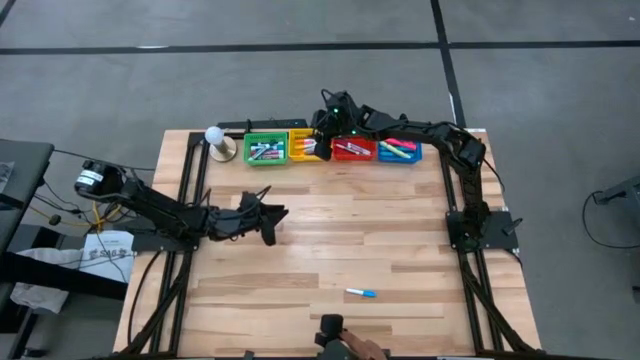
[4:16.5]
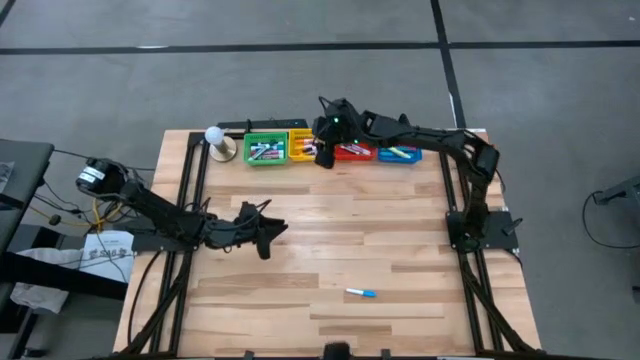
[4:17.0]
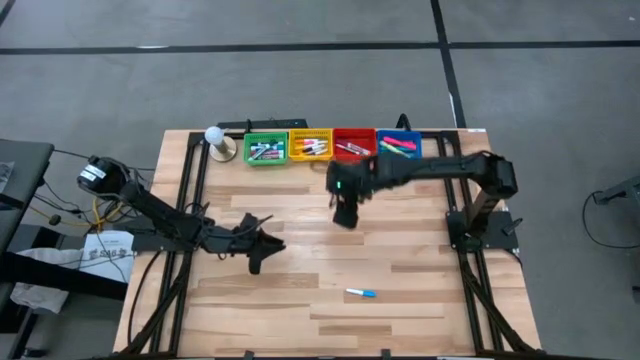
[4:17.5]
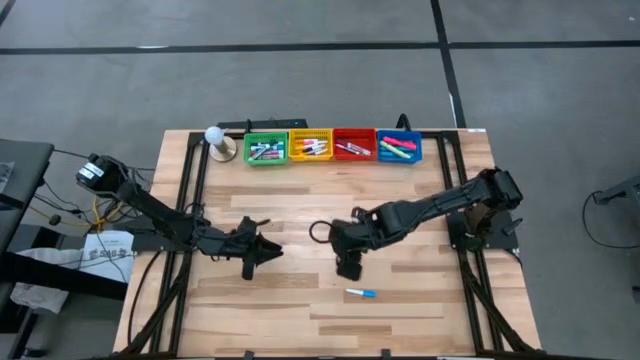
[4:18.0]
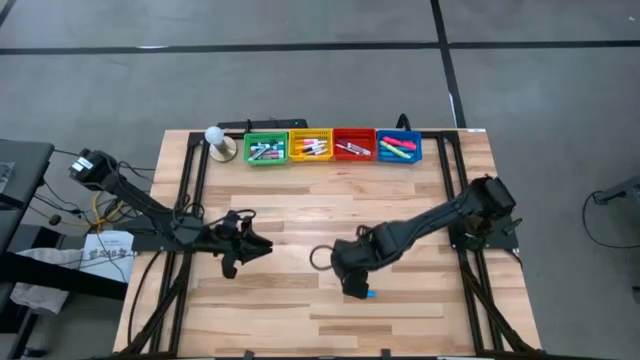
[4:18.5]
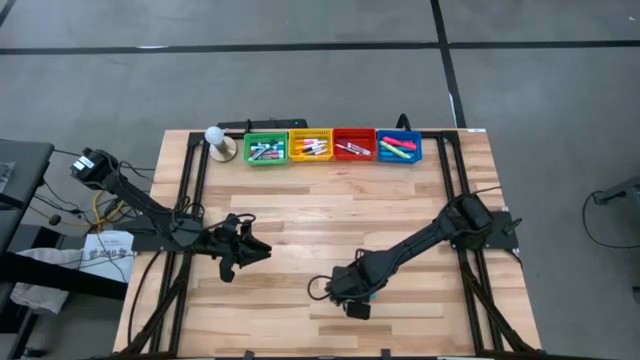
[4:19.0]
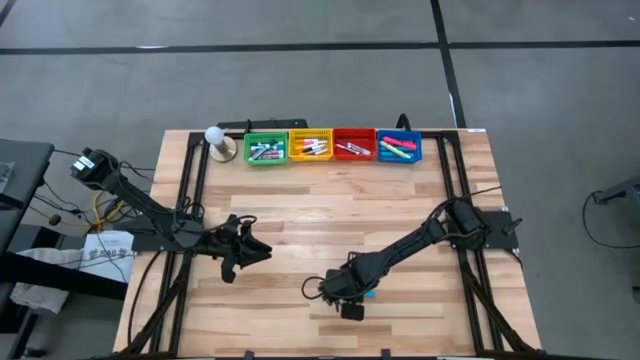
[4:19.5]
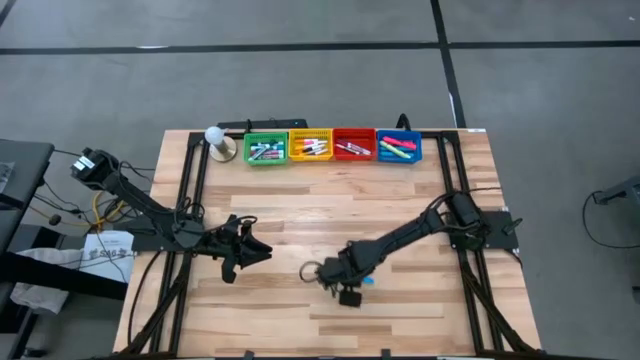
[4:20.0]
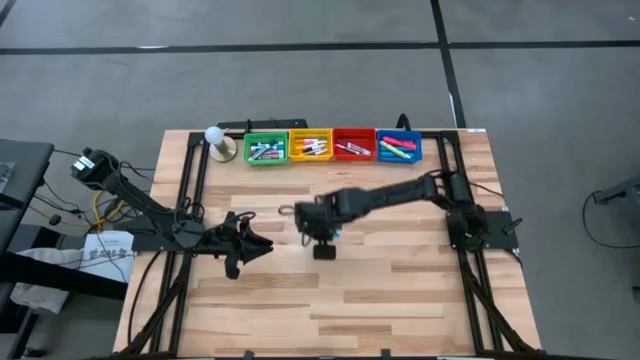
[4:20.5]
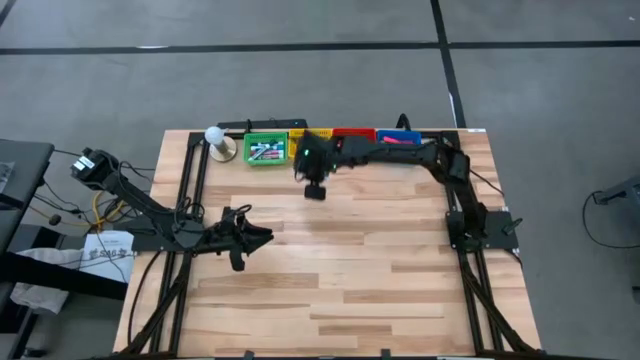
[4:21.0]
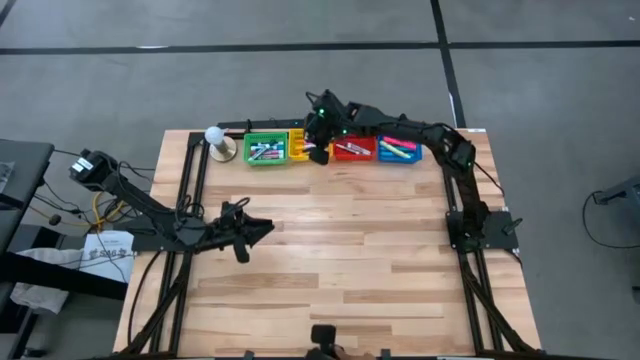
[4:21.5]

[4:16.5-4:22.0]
Task: Pick & Place Markers
Put the light blue highlighter pen into the yellow basket

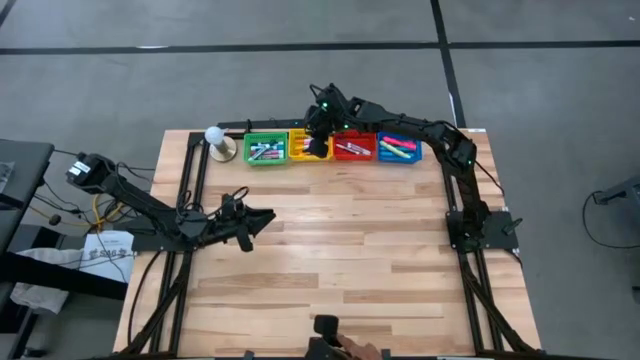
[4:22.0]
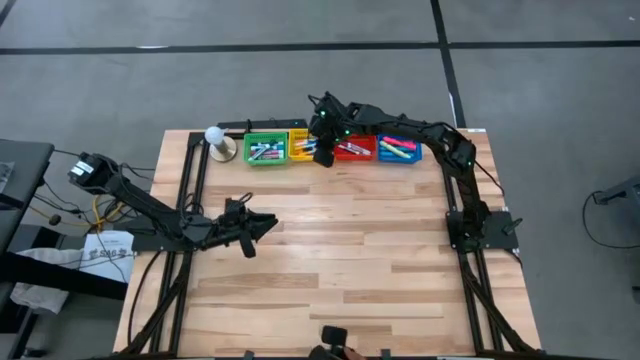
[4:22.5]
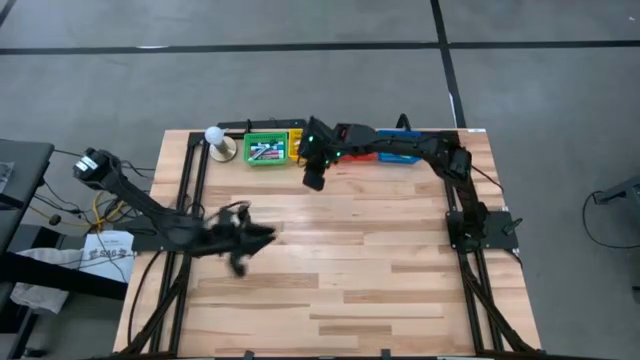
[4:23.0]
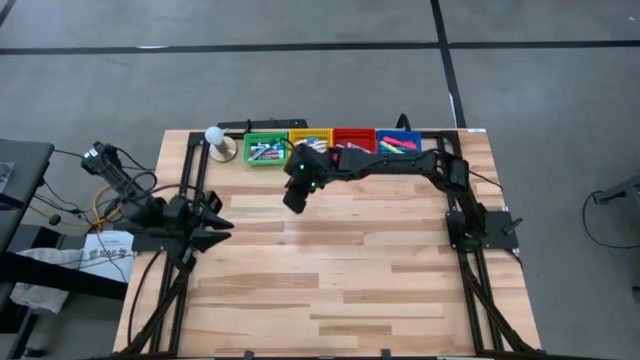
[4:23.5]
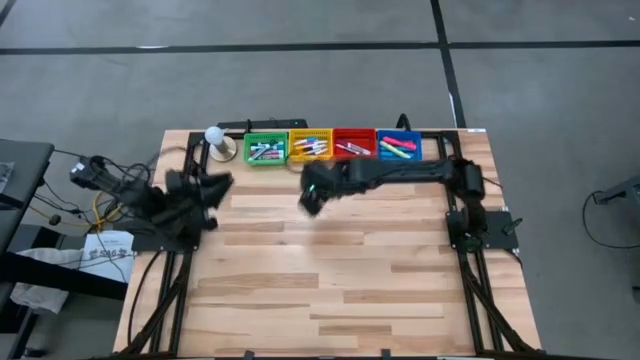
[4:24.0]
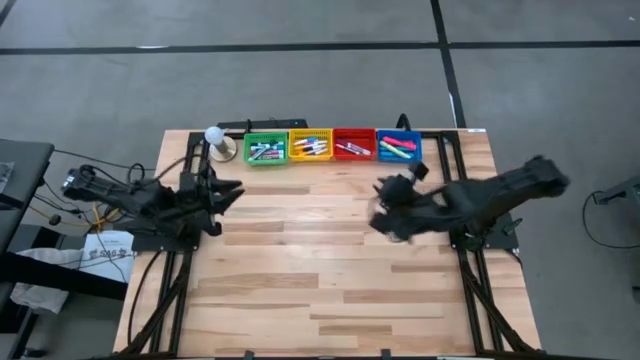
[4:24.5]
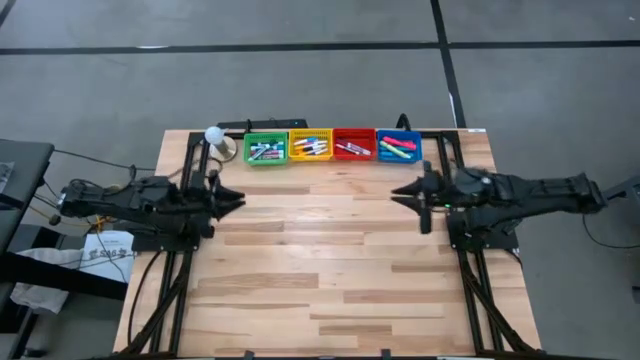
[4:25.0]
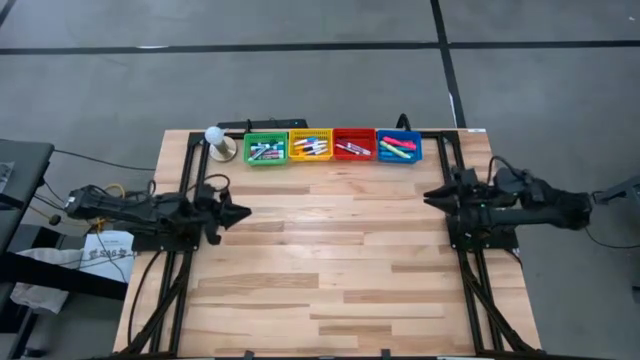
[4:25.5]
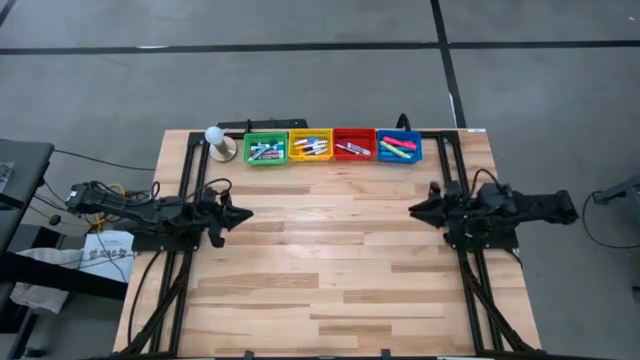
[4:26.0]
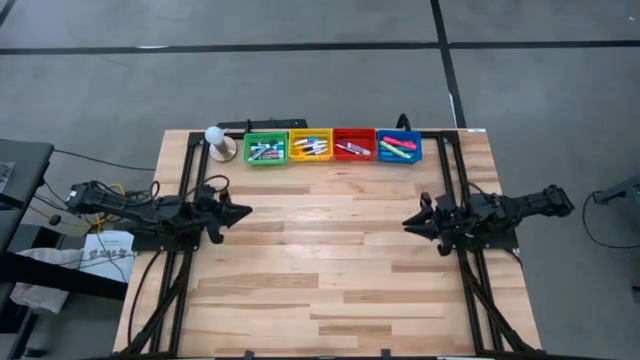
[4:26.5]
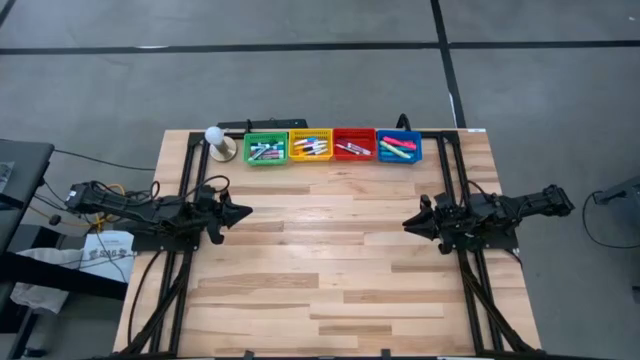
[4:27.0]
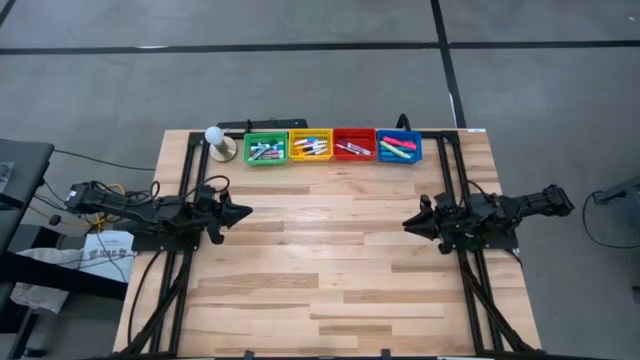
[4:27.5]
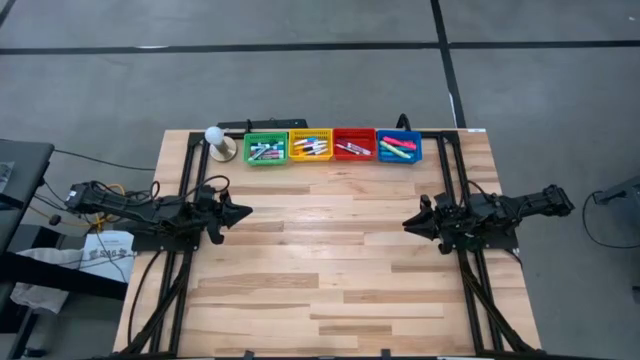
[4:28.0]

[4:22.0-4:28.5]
Return to Home Position

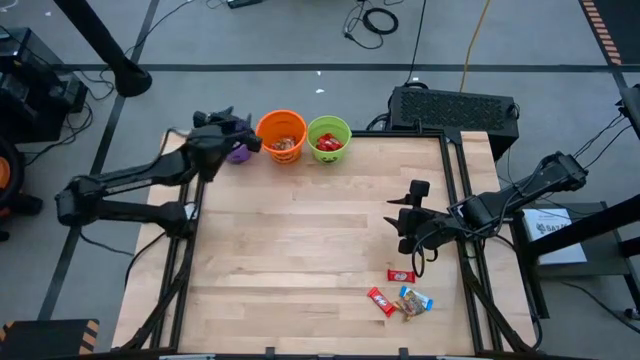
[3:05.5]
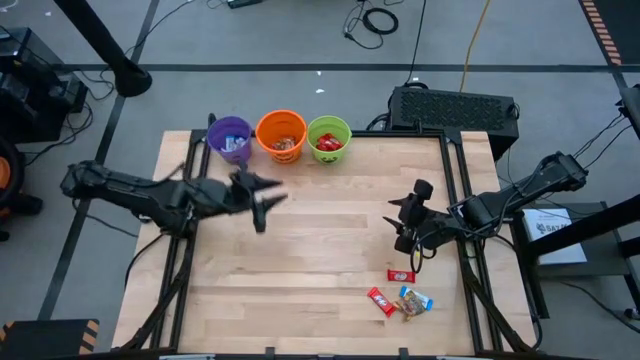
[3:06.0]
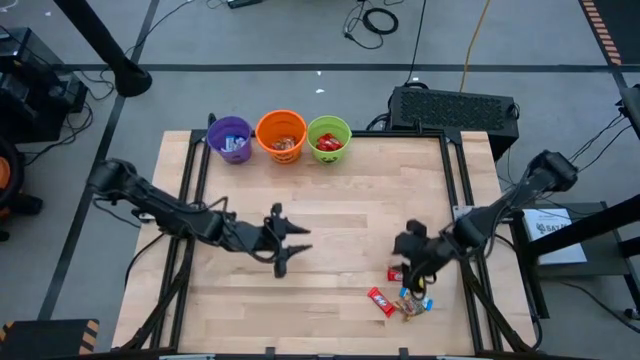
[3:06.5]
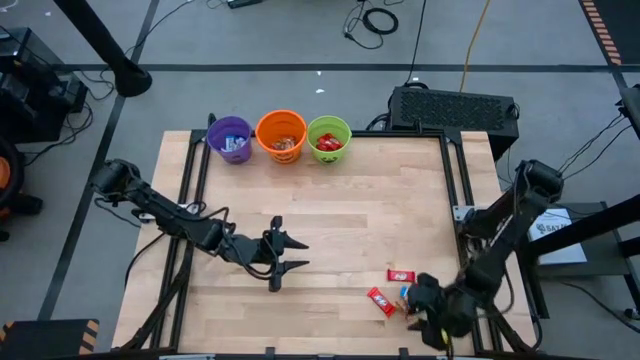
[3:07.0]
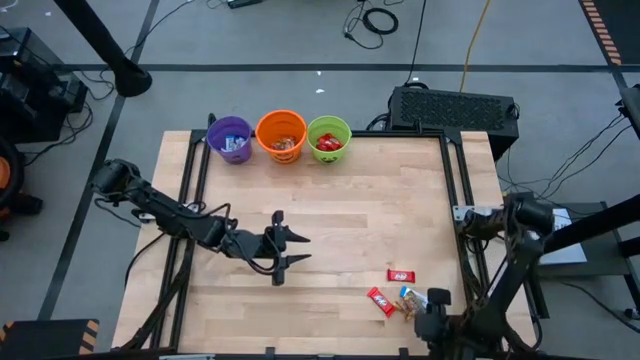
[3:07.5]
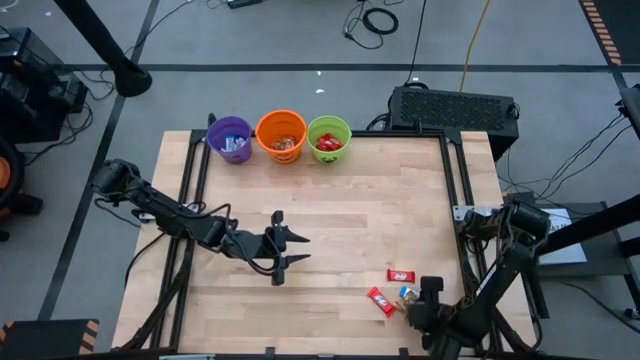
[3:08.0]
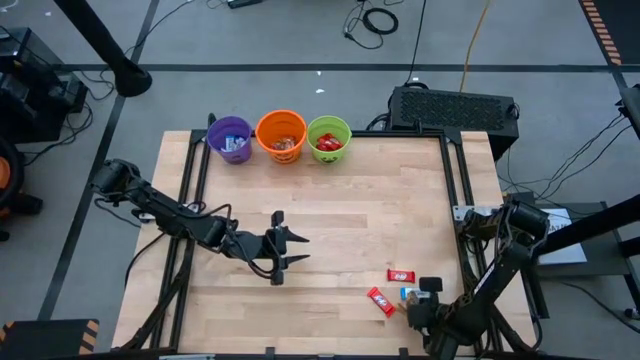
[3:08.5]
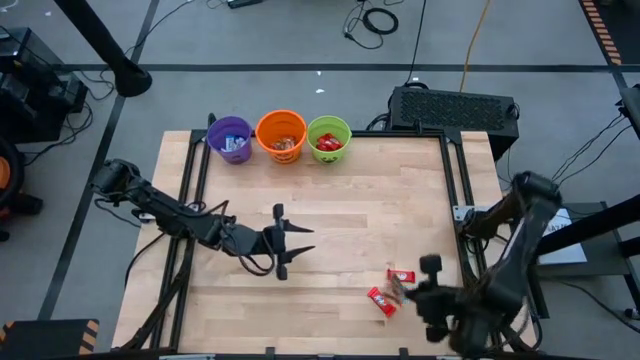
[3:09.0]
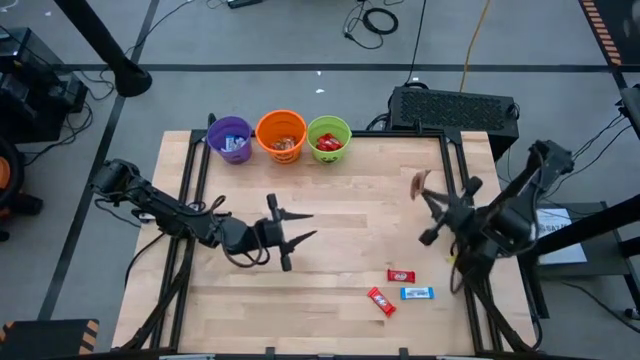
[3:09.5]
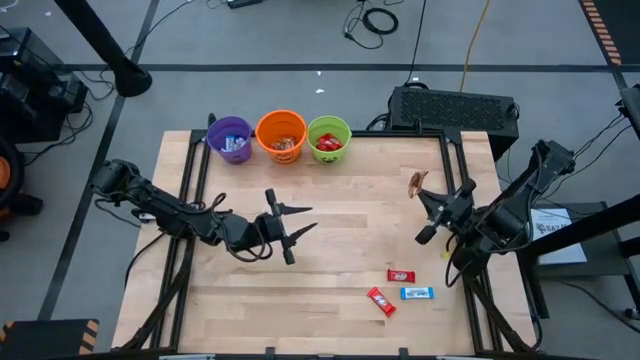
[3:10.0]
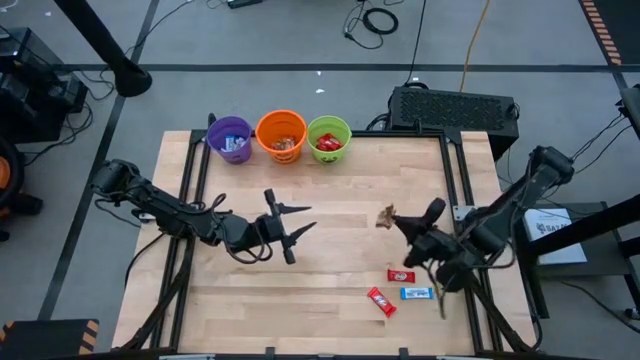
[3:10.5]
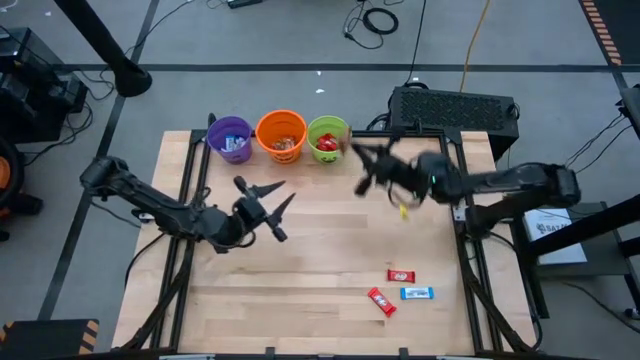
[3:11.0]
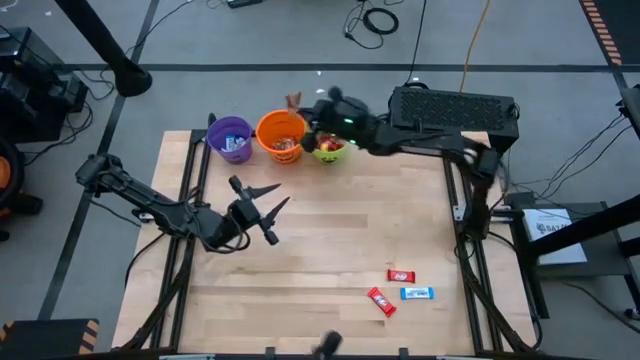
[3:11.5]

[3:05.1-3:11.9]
Task: Sort candy by brand, put in halloween buckets
Put golden candy into the orange bucket
